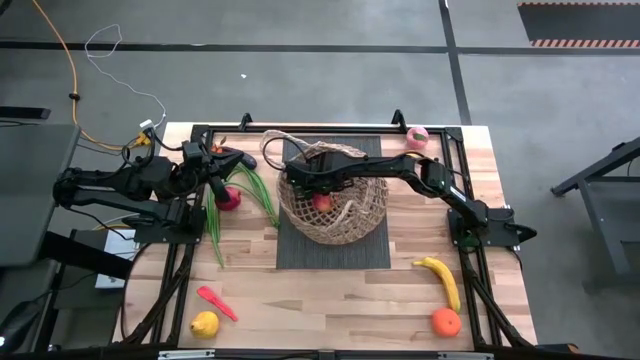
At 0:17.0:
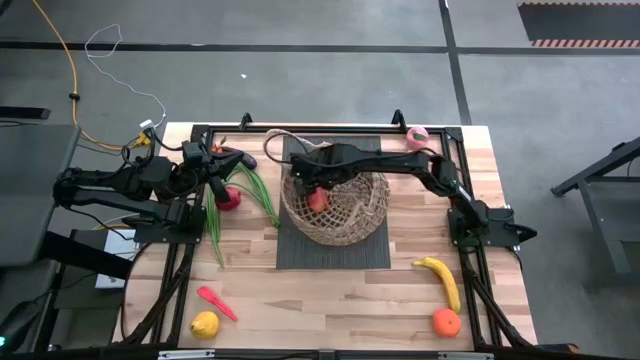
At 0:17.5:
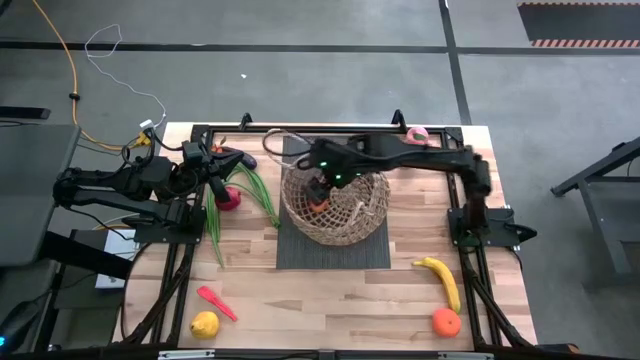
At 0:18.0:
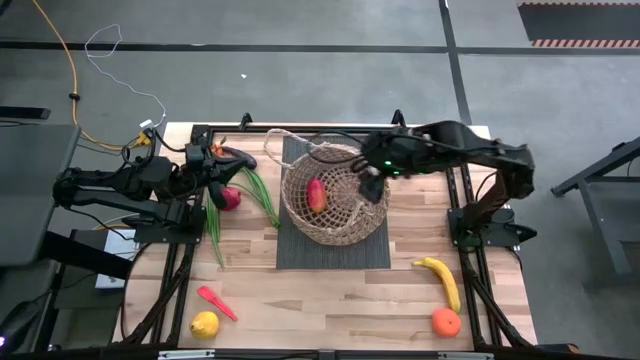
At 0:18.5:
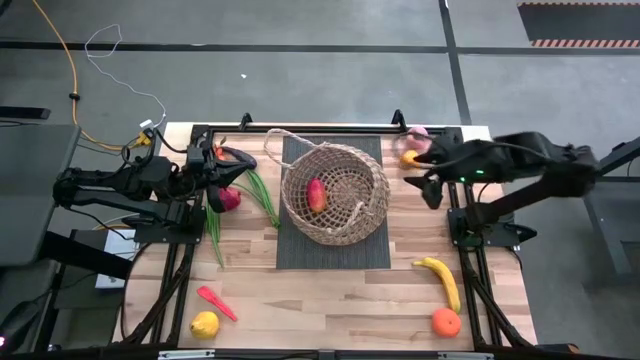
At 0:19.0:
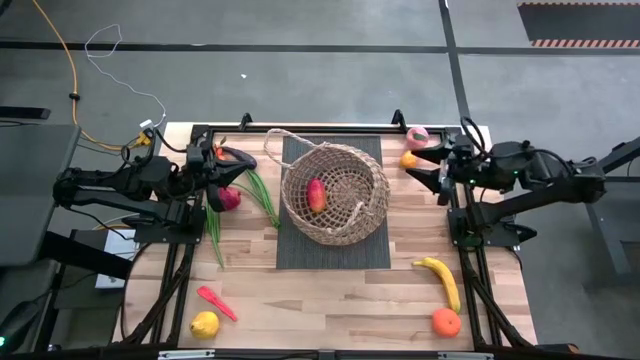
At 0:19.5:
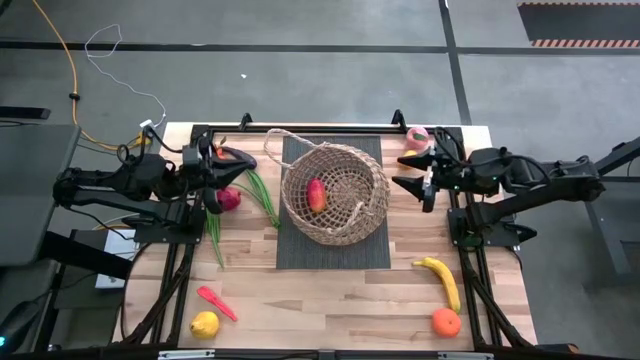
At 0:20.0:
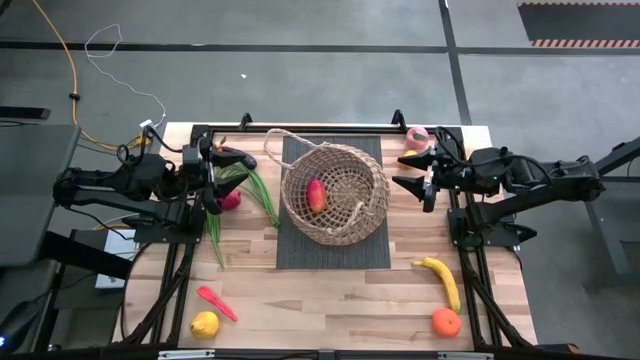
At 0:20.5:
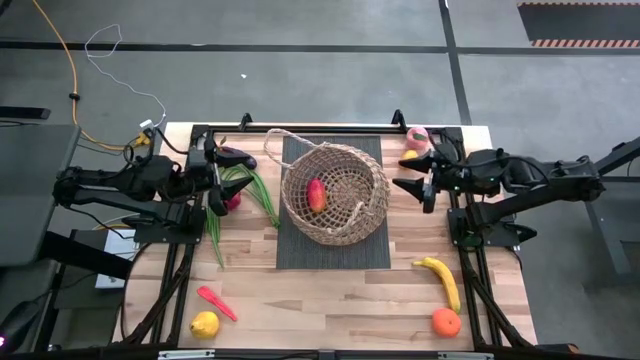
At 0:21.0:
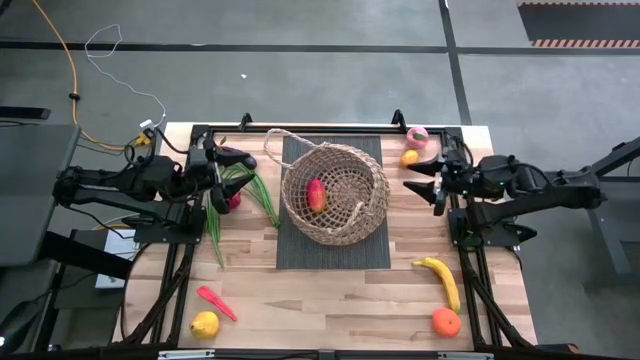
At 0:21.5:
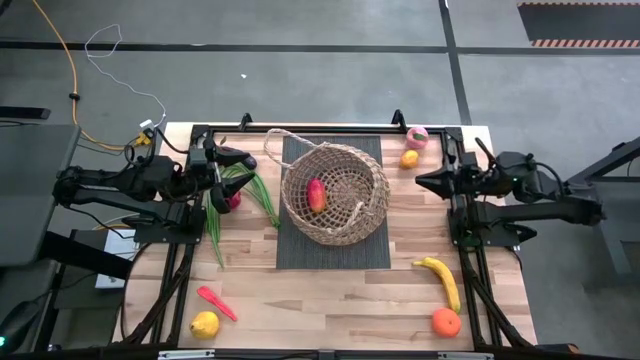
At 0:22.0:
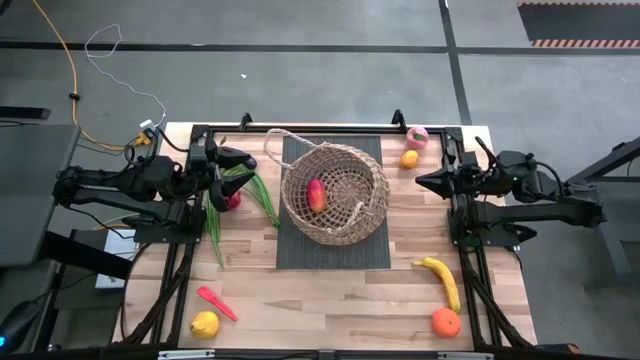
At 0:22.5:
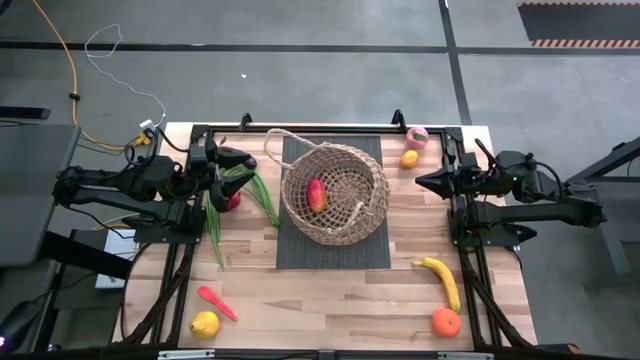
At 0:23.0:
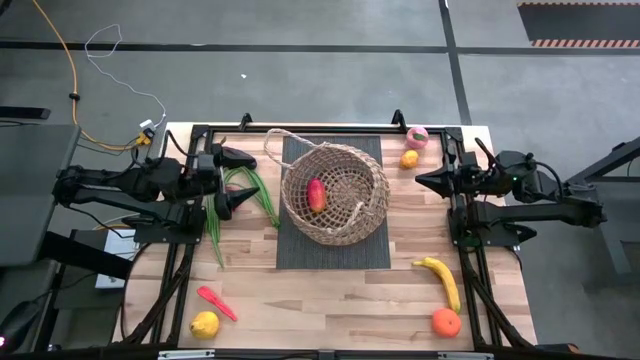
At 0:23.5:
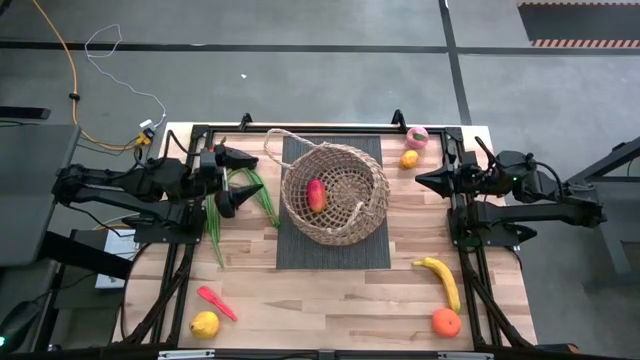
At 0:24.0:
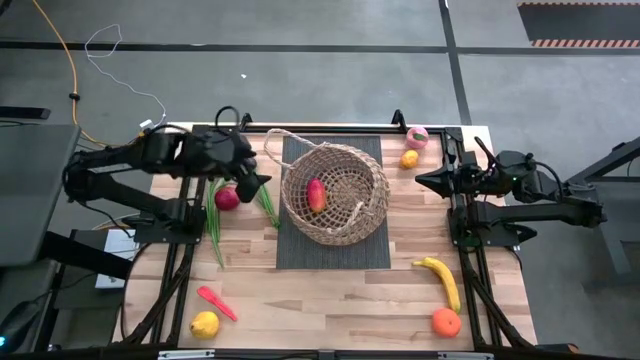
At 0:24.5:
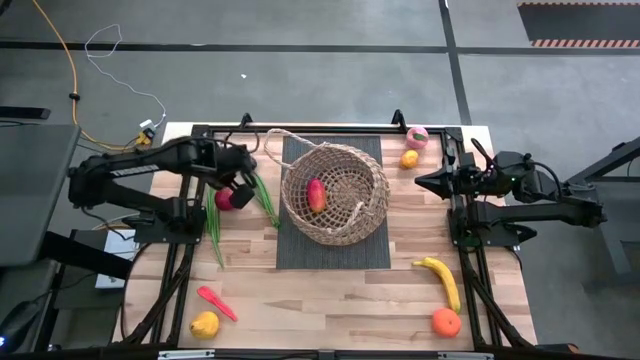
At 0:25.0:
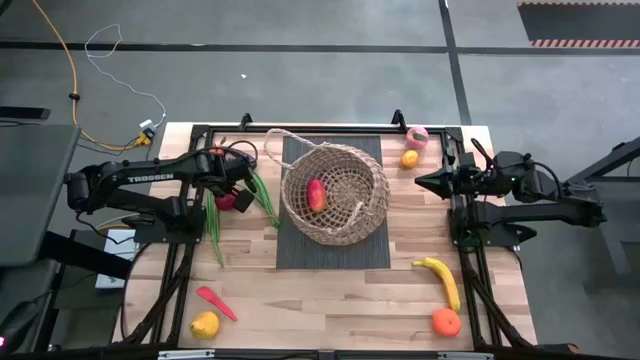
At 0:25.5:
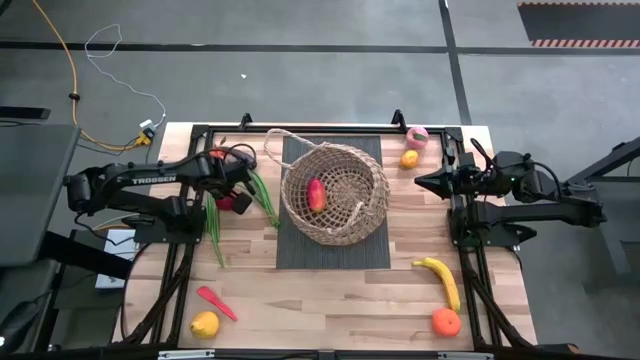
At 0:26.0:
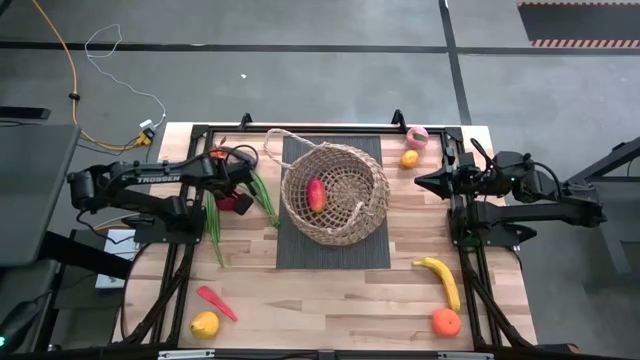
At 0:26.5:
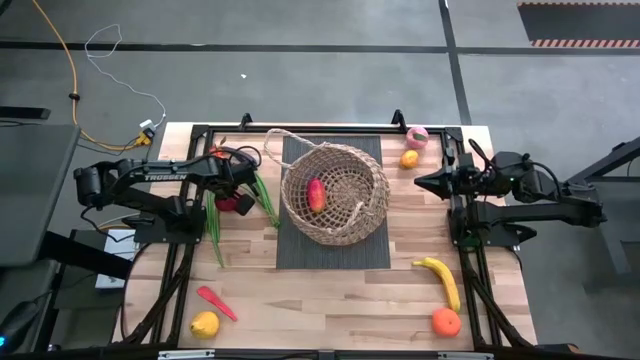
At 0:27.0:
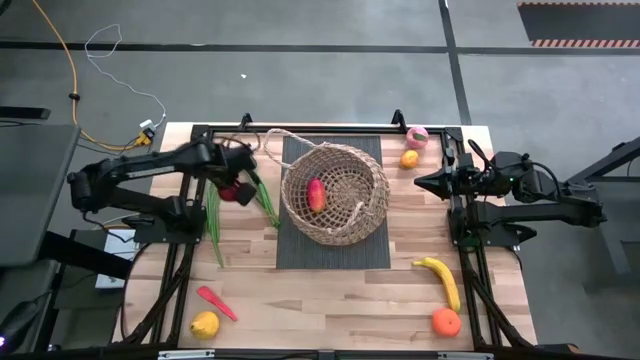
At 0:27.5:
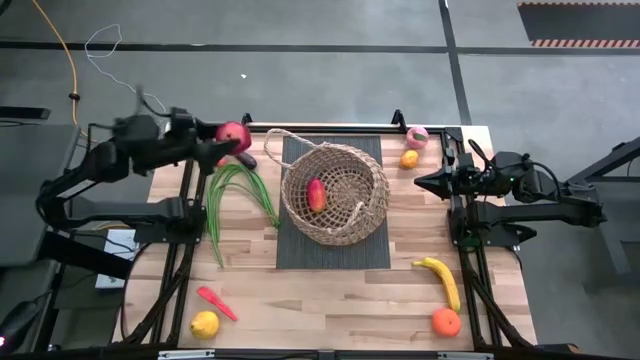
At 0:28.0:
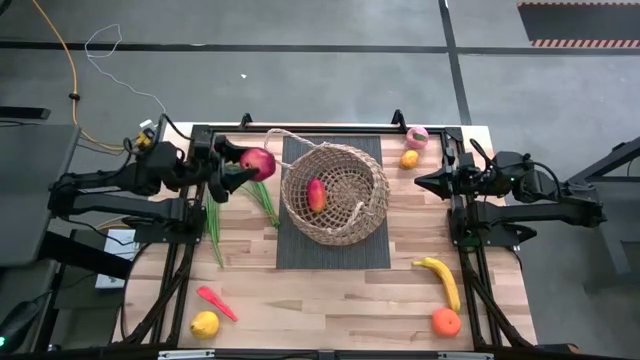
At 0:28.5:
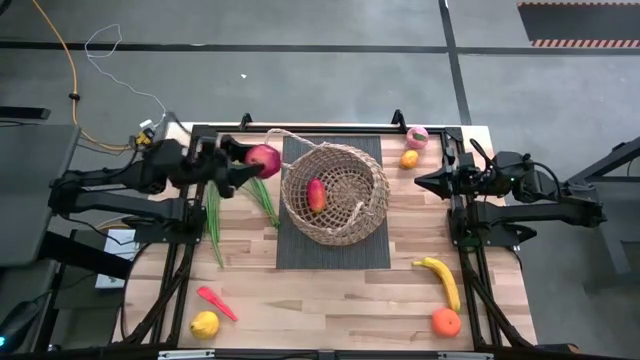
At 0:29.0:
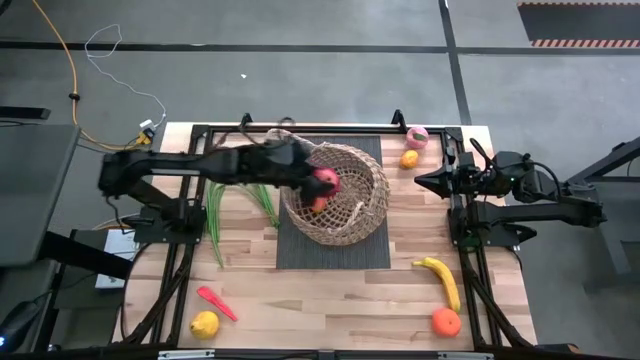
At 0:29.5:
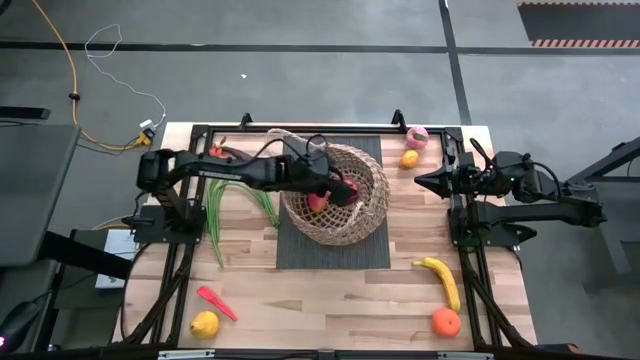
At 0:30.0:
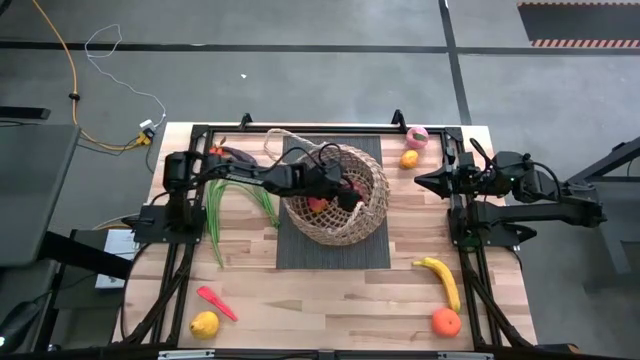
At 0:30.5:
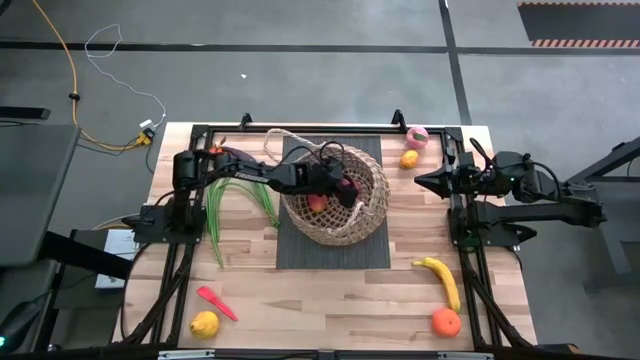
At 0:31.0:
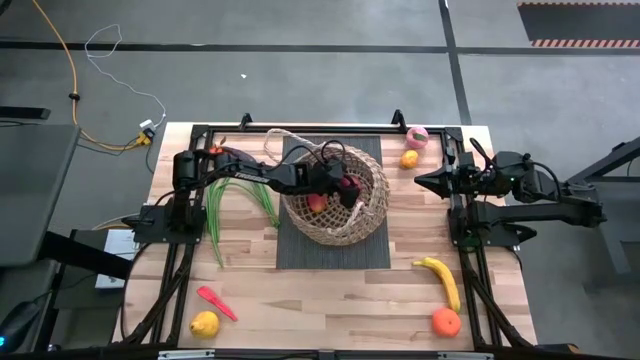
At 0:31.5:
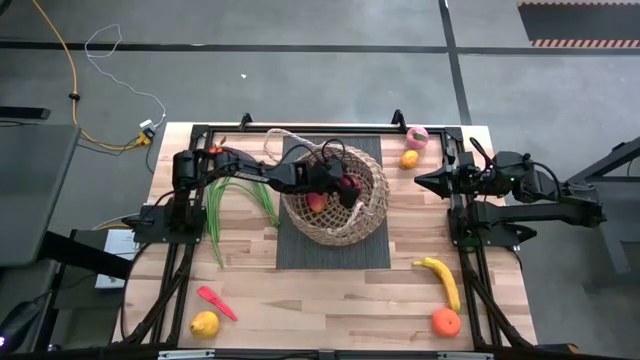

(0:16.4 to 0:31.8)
Task: Build produce basket
Put the pomegranate into the woven basket

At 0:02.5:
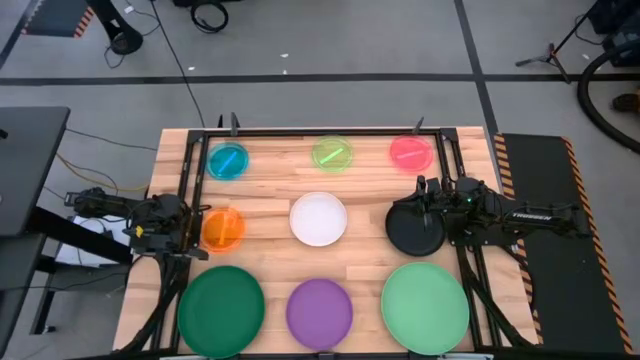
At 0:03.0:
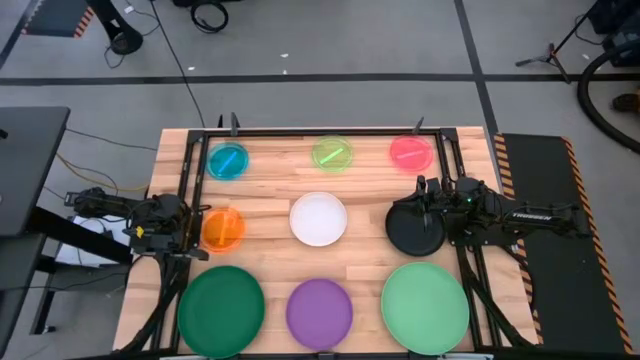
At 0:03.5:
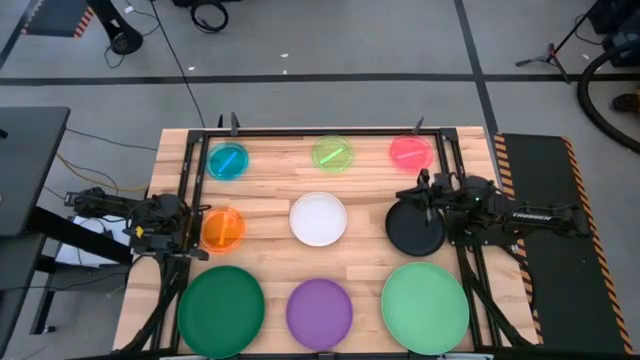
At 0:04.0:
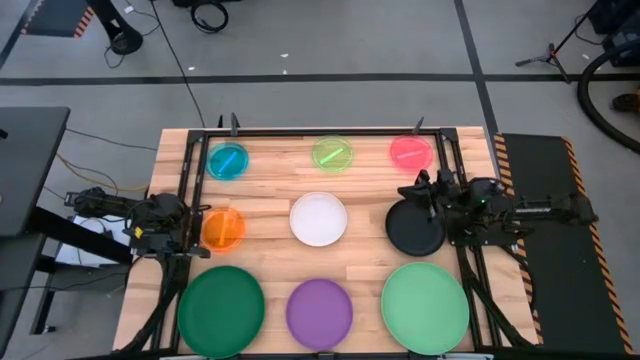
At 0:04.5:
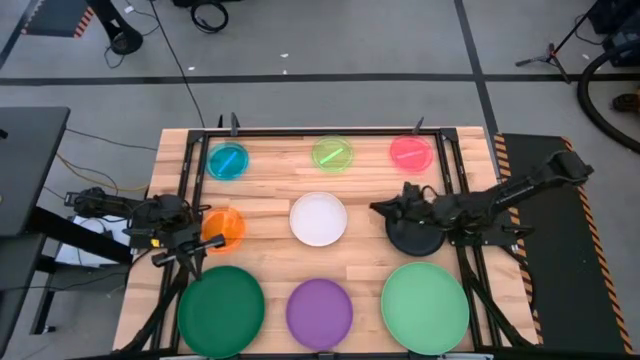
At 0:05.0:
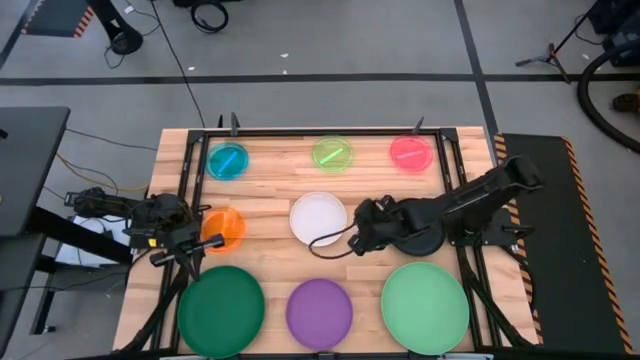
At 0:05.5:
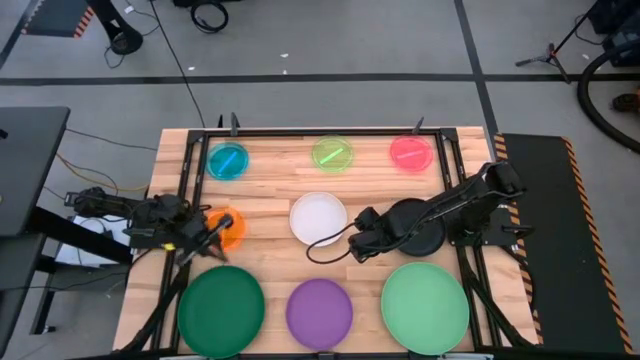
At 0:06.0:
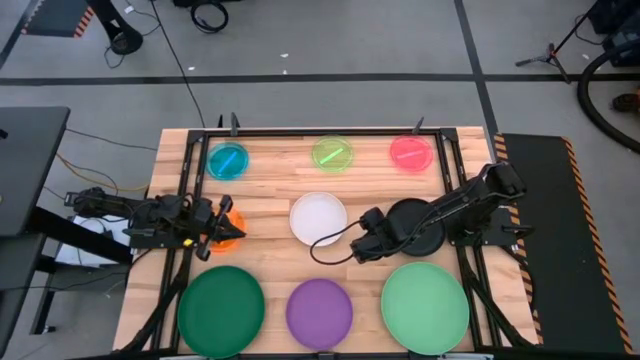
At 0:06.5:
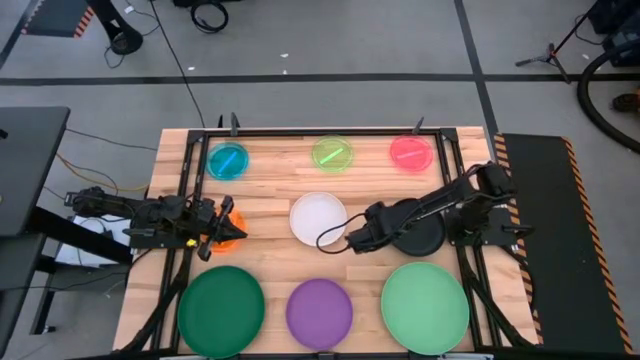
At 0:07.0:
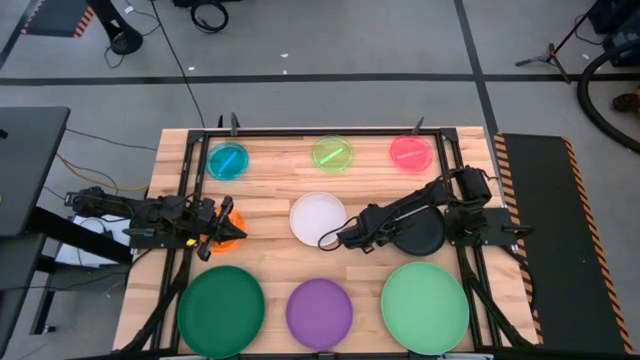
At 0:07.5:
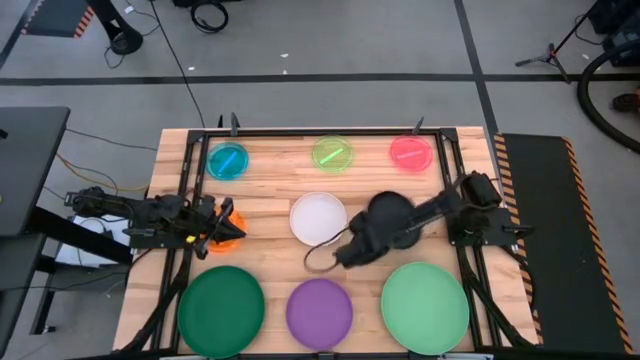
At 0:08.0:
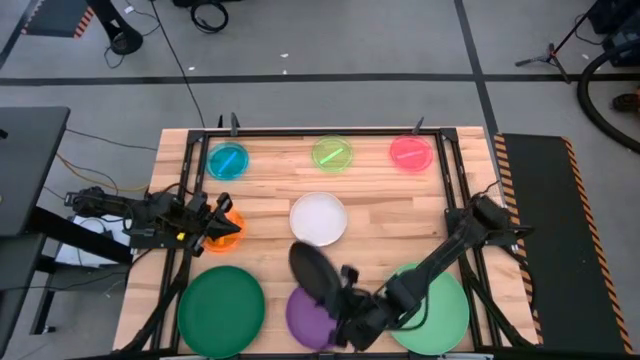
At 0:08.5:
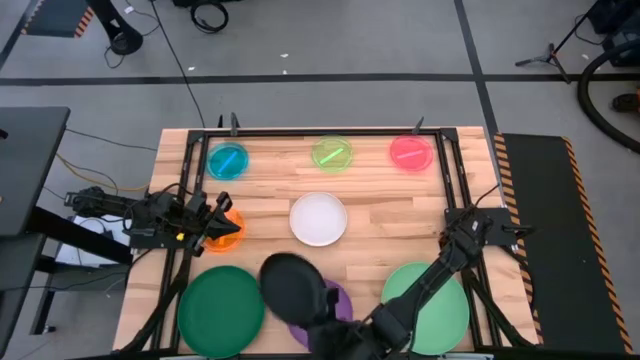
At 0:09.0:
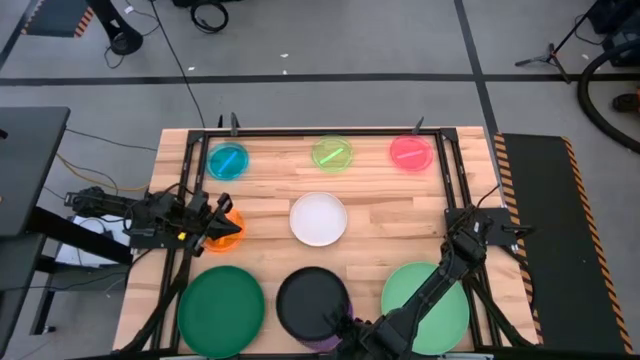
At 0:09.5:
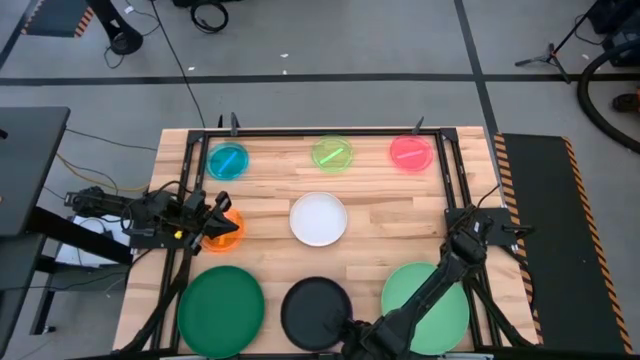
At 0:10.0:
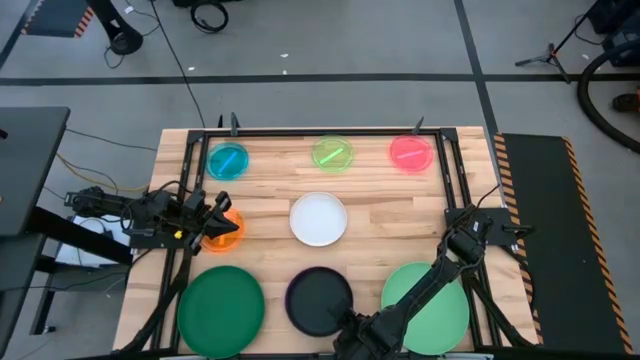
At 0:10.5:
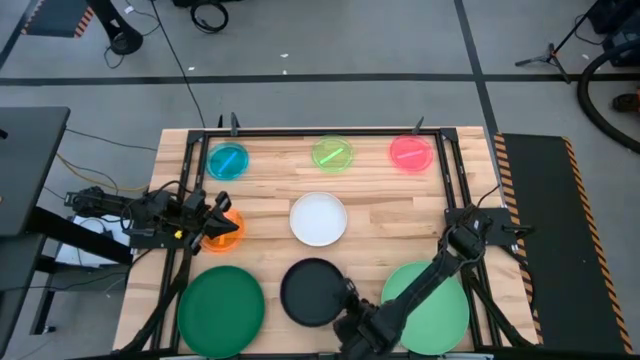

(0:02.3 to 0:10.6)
Task: Stack plastic plates
Stack the black plate on top of the purple plate
